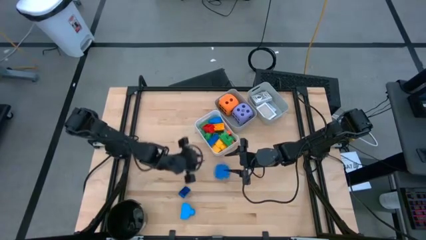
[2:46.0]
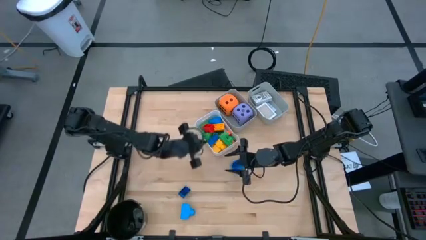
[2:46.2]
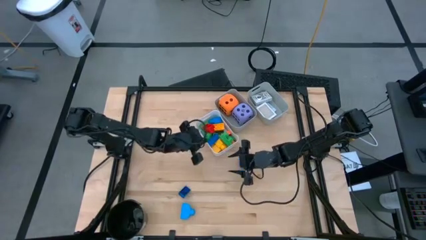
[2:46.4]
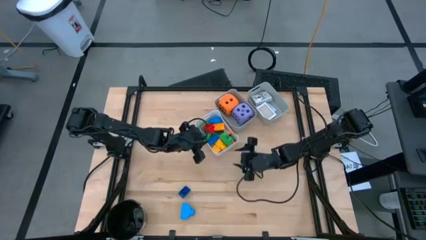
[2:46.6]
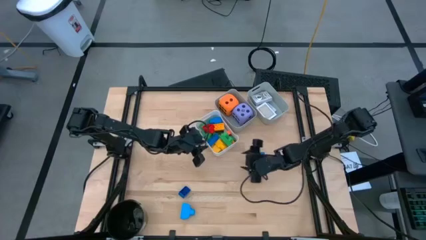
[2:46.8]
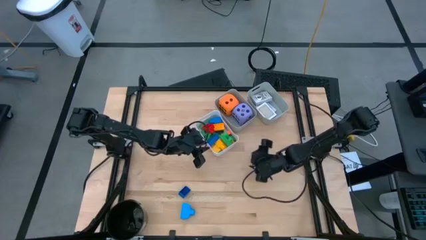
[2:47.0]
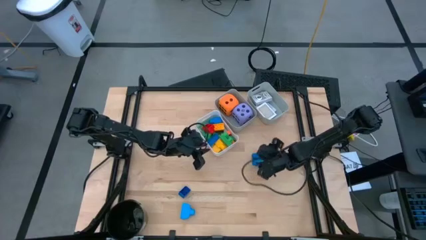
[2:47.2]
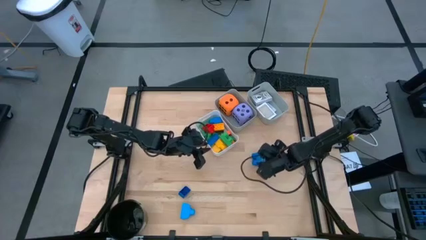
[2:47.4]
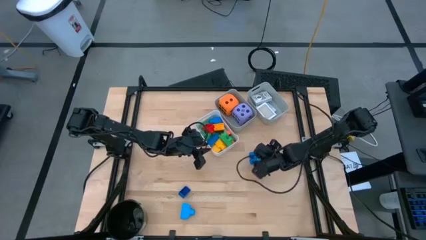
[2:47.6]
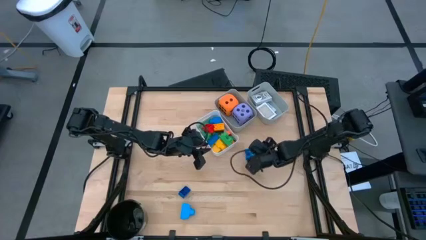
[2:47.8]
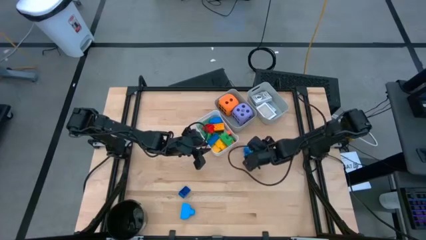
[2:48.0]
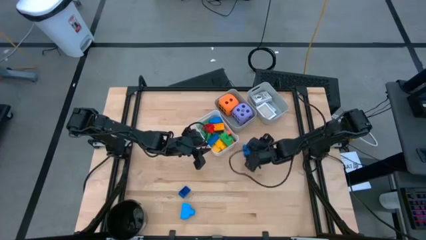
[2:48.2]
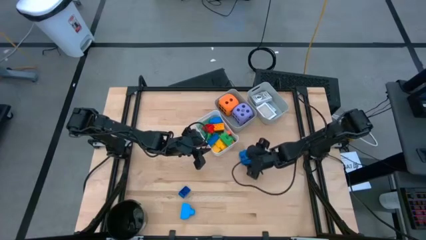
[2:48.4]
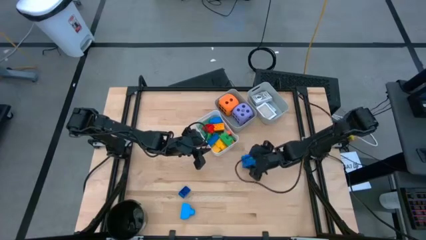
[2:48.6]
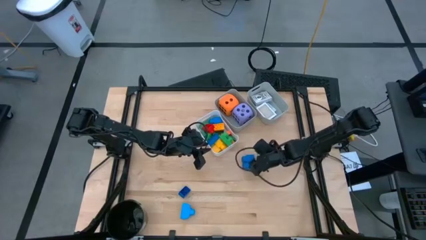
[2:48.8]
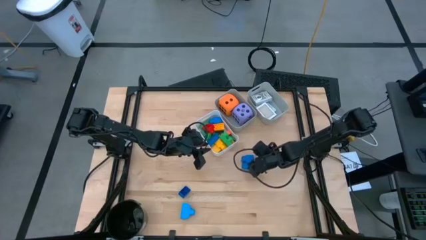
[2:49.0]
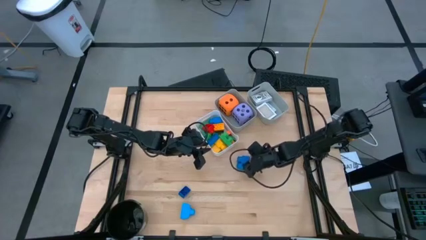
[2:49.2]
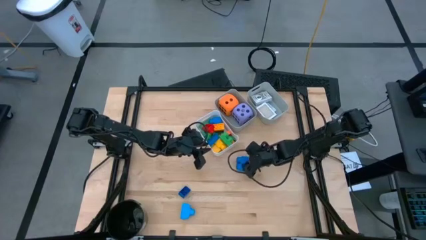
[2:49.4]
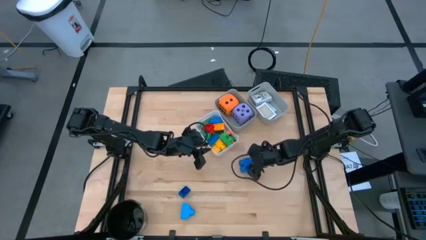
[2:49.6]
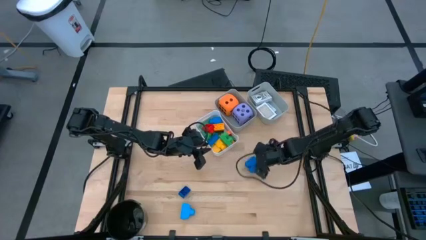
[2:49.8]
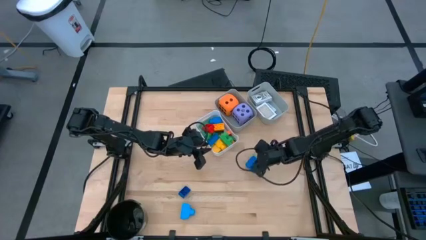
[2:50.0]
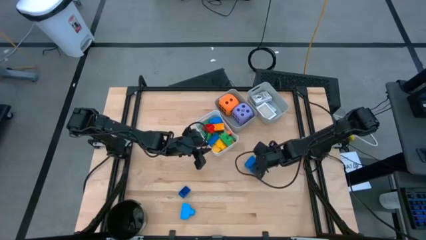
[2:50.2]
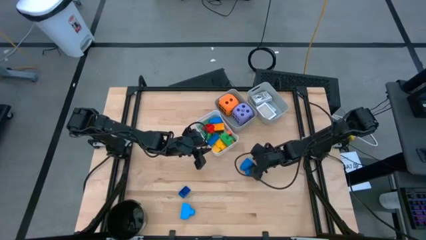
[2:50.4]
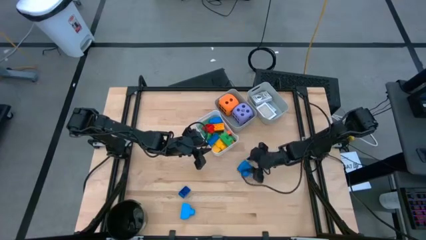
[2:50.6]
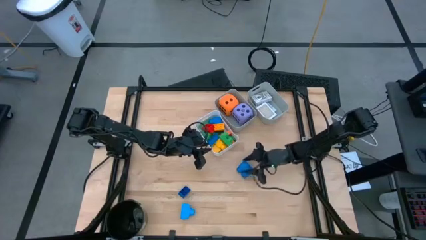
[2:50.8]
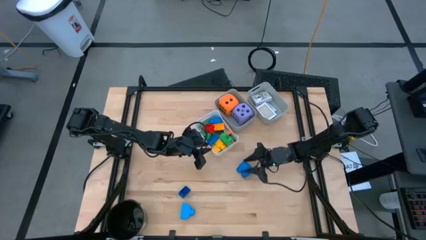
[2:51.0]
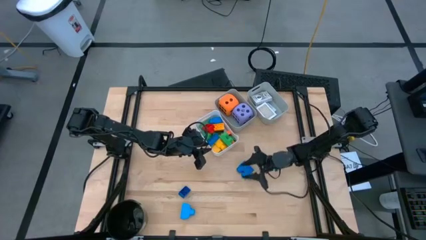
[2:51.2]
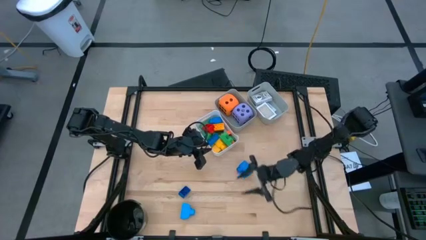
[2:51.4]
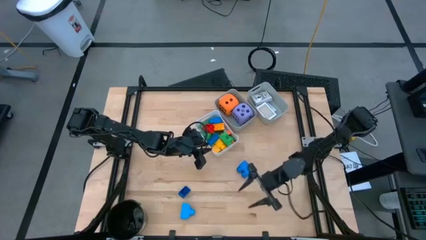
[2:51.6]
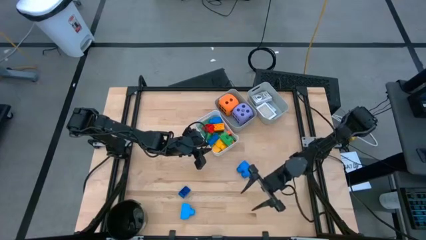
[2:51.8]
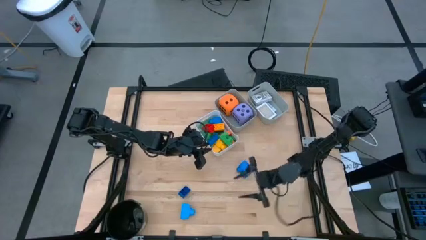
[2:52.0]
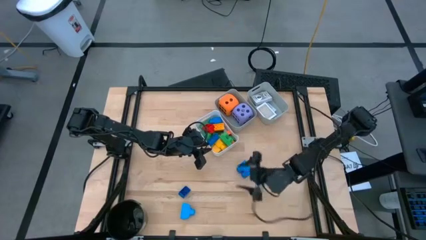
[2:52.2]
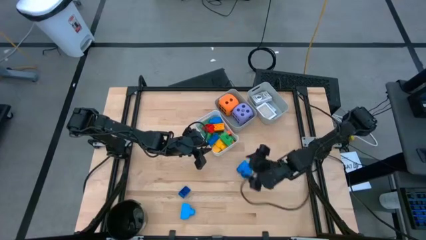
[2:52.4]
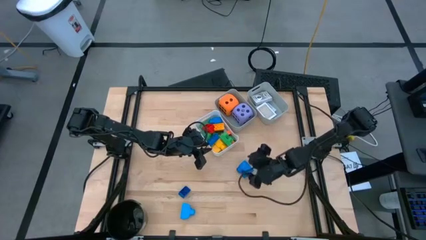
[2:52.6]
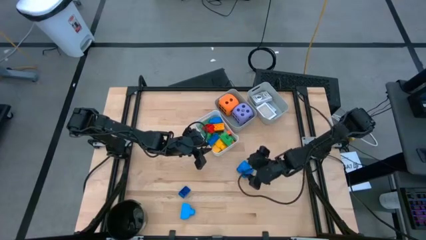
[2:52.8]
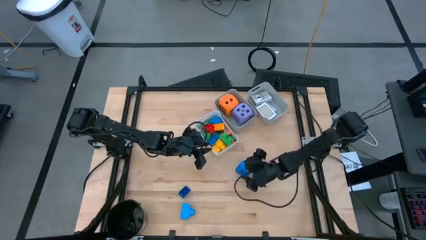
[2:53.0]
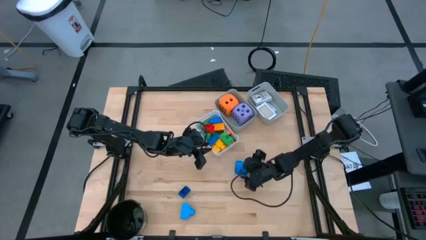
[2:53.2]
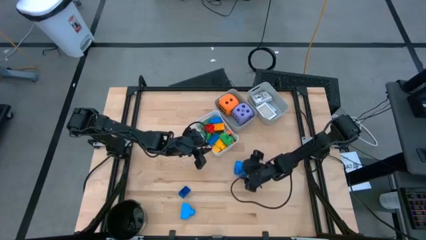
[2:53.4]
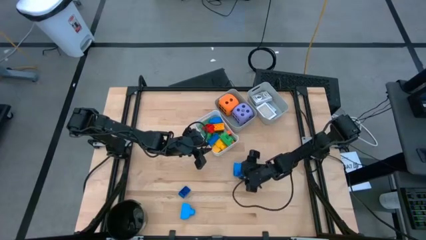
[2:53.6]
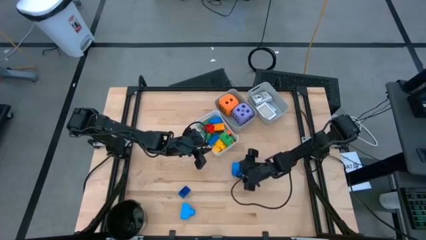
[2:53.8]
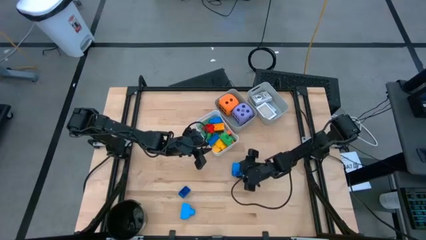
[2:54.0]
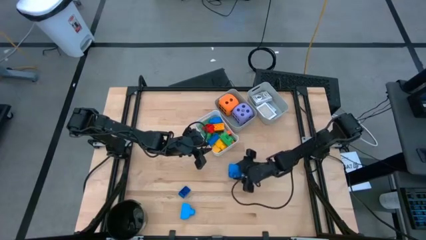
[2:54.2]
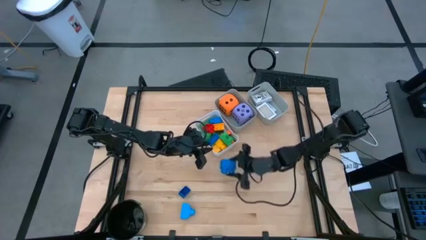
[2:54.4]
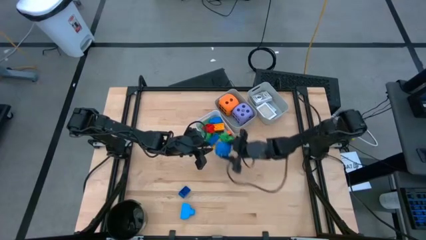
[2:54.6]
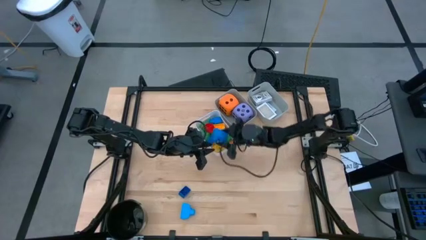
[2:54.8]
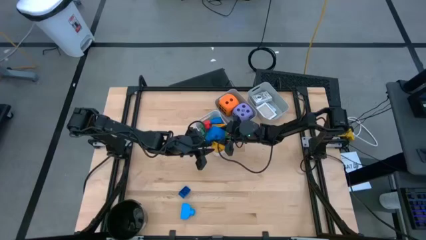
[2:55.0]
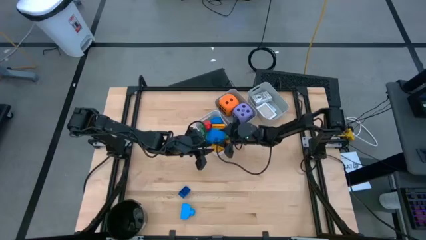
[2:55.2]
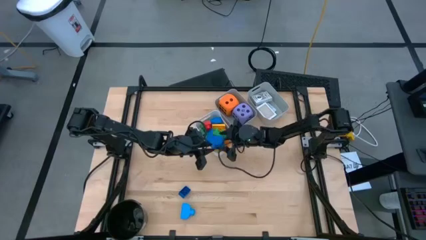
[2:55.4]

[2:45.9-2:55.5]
Task: Pick & Place Toys
Put the blue game piece into the white bin

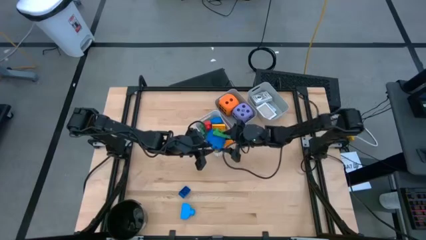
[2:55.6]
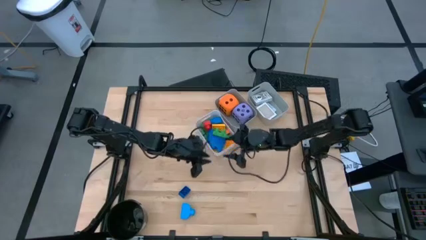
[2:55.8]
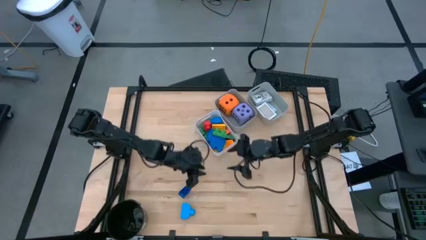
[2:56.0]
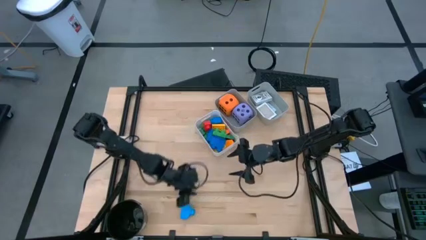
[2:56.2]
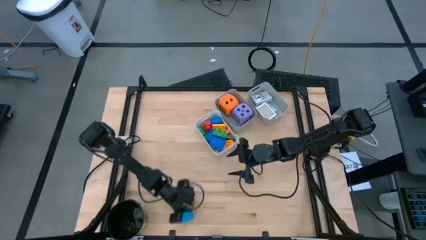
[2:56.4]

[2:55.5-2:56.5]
Put the light blue game piece into the white bin

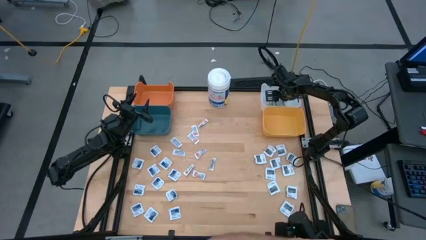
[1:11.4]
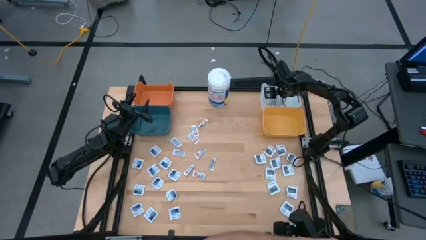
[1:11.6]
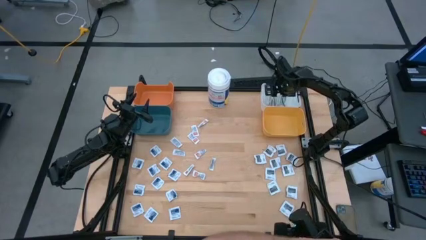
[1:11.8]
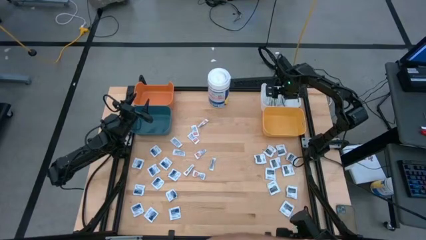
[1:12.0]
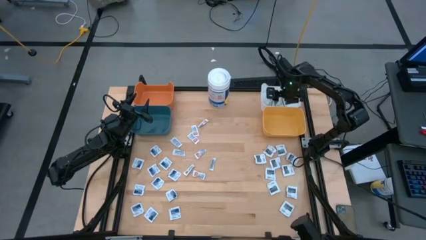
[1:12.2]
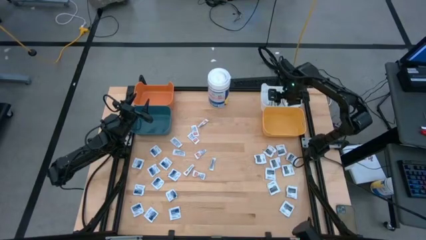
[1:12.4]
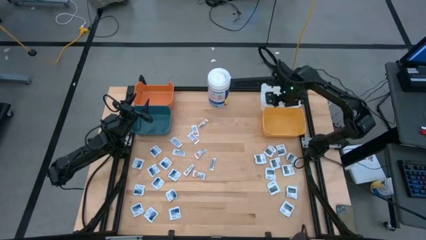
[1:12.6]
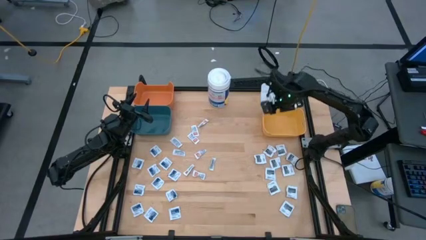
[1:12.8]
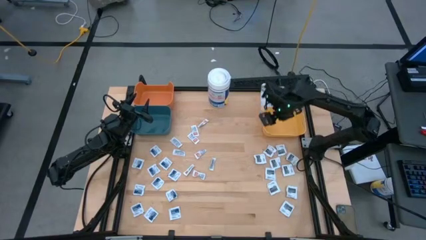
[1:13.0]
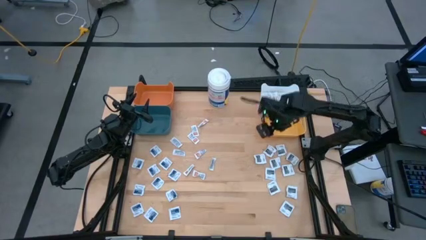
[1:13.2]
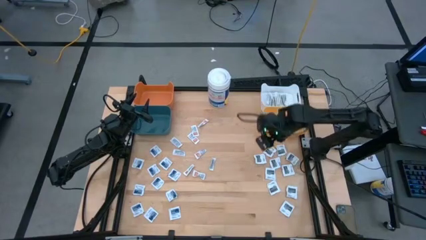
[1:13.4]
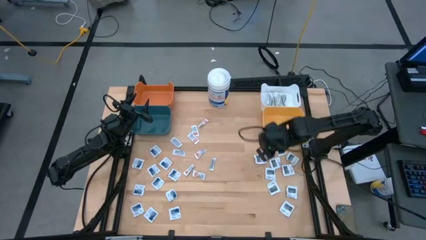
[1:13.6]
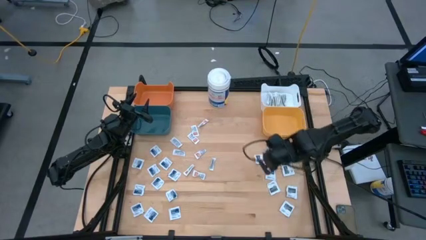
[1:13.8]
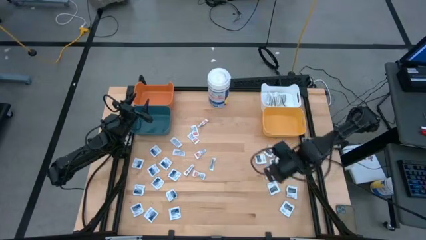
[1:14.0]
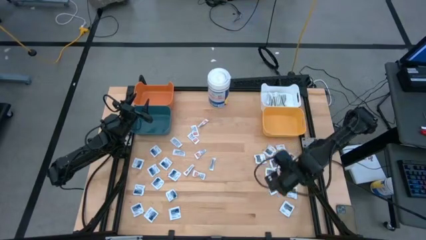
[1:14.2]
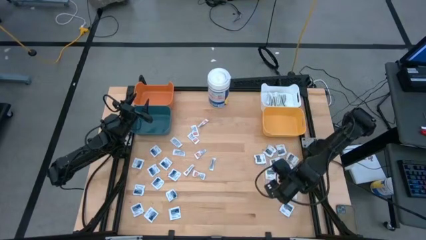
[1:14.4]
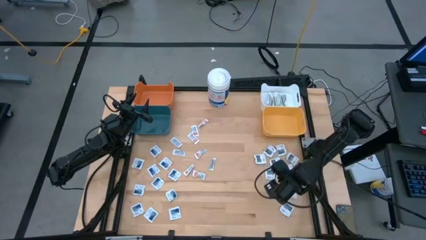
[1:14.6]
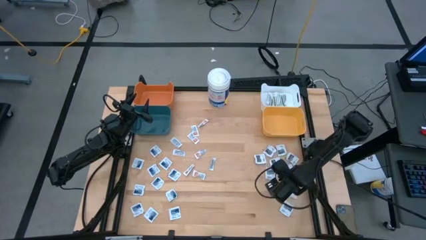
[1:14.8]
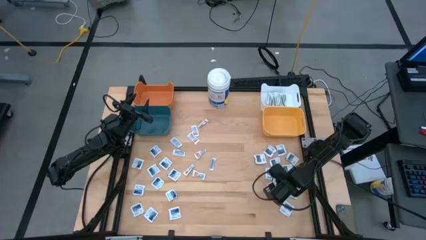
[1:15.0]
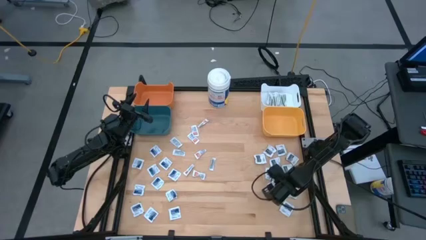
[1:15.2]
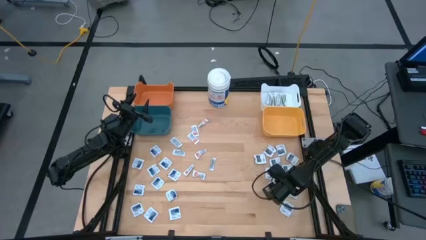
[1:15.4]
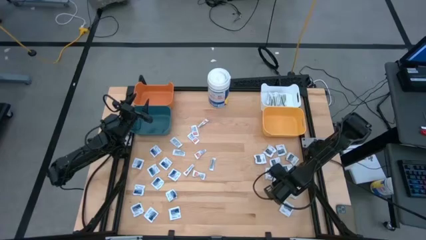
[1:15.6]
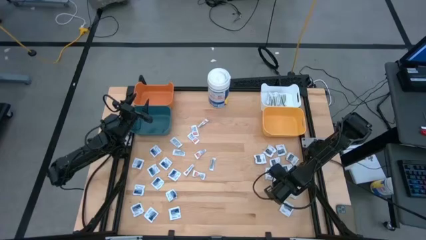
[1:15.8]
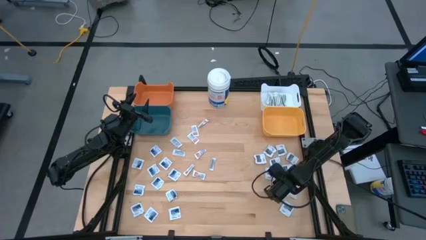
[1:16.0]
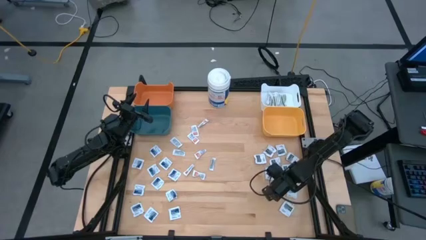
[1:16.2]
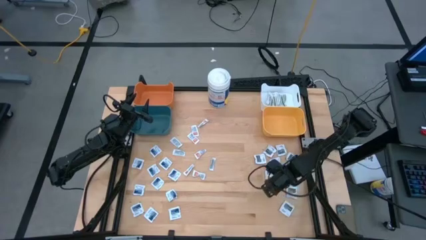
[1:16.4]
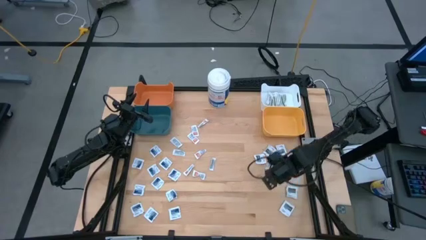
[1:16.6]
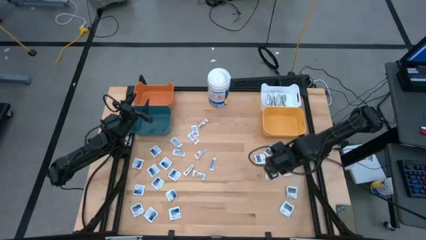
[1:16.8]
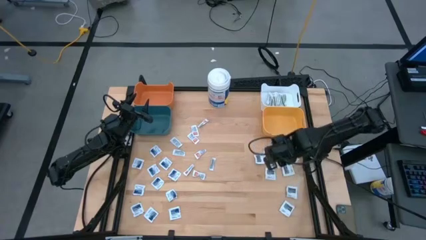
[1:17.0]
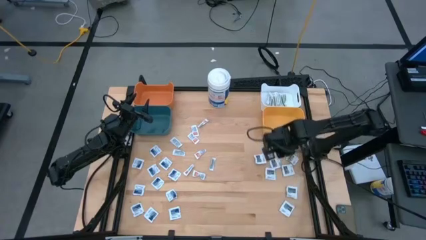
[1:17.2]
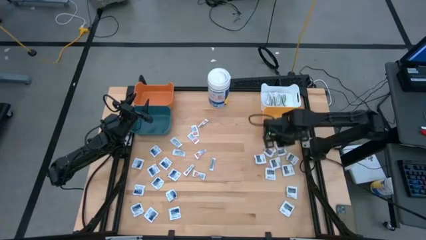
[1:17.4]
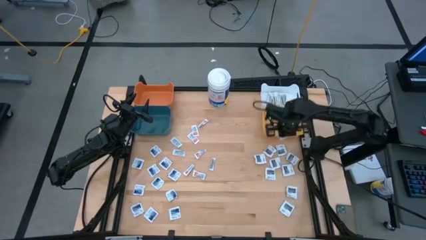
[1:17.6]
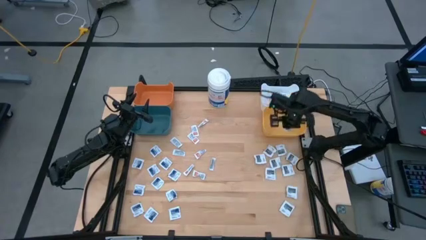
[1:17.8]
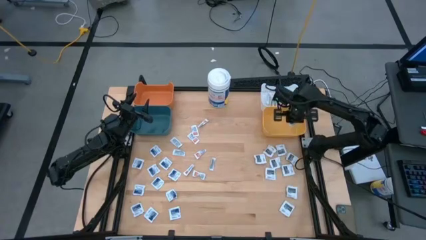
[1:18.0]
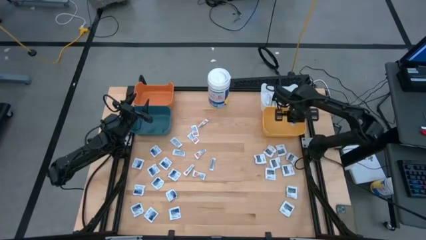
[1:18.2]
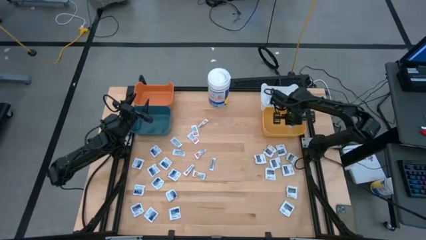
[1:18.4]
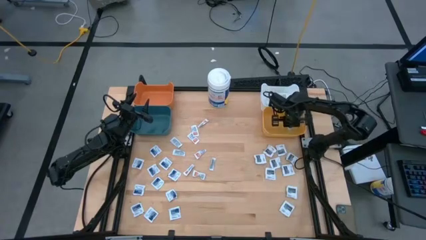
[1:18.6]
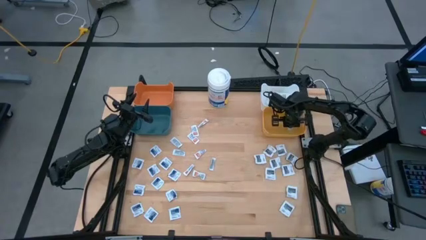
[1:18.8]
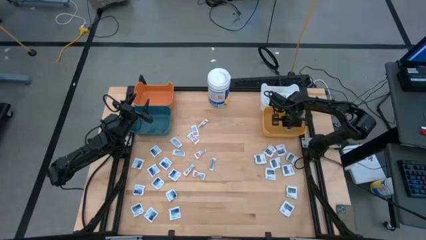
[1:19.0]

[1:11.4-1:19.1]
Task: Pick & Place First Aid Supplies
Put the black pad into the yellow bin
